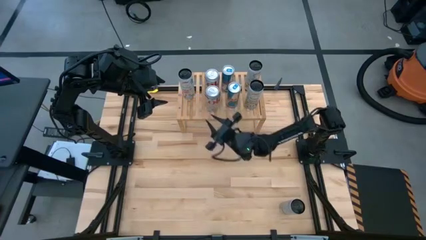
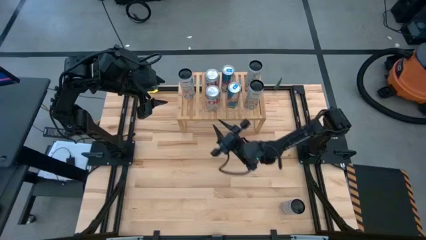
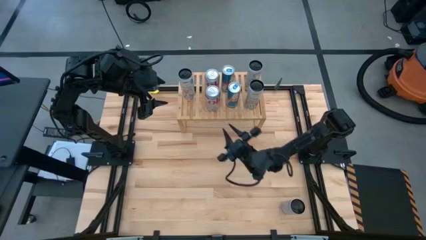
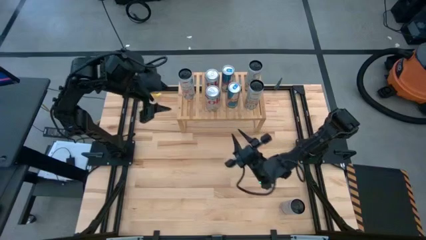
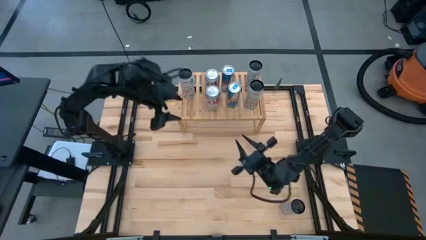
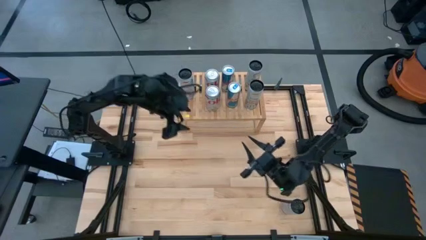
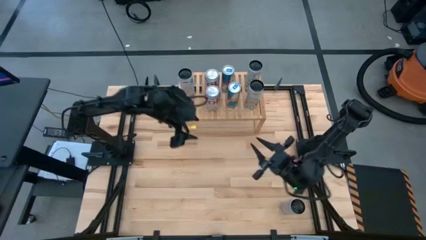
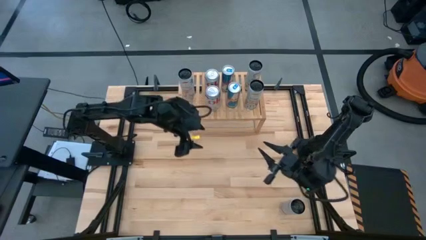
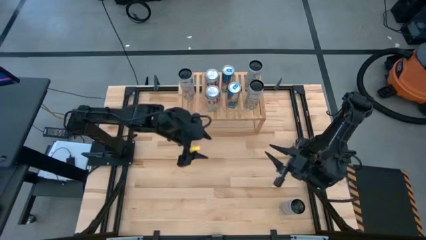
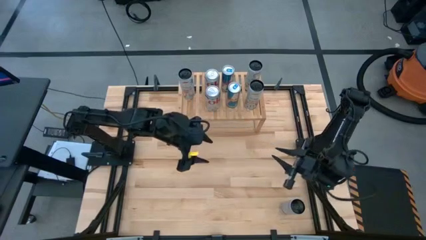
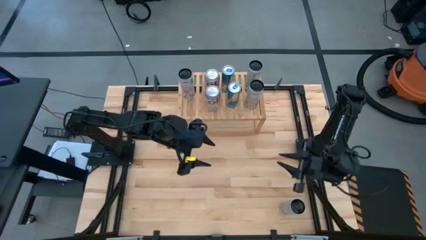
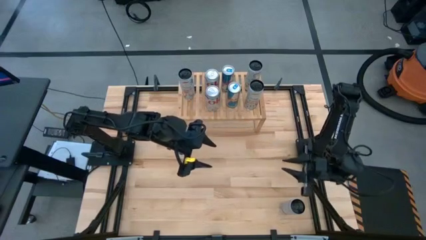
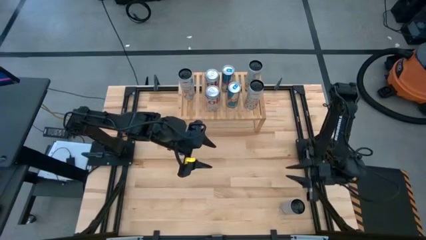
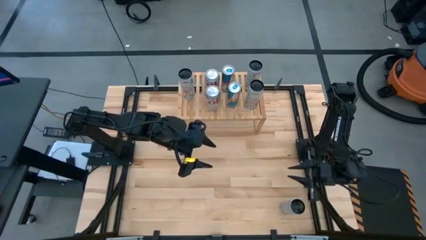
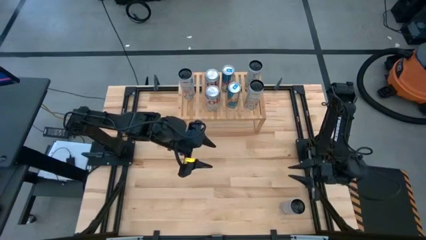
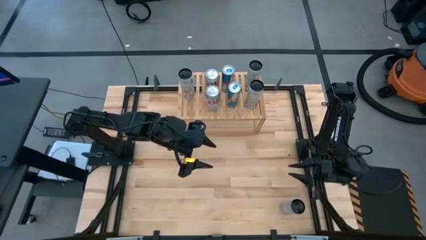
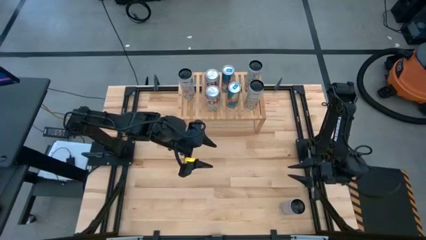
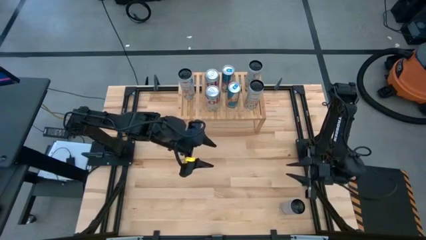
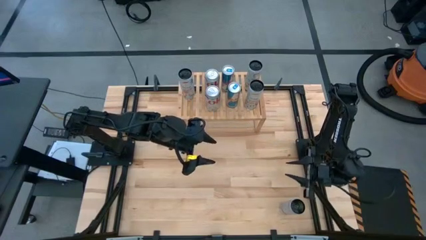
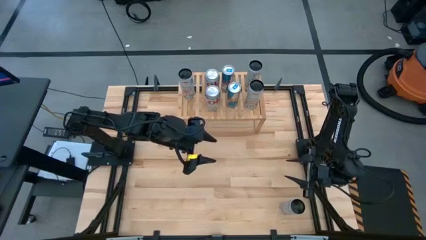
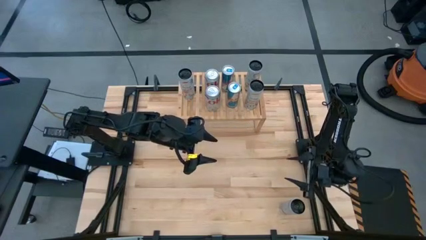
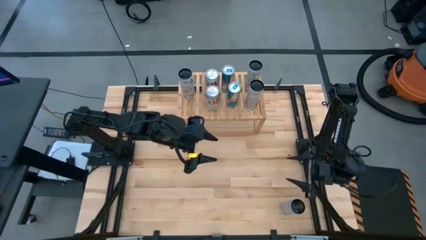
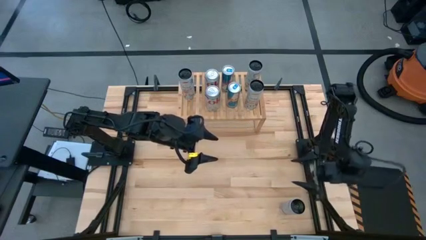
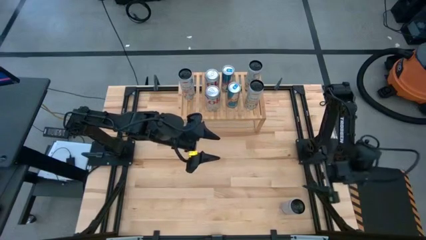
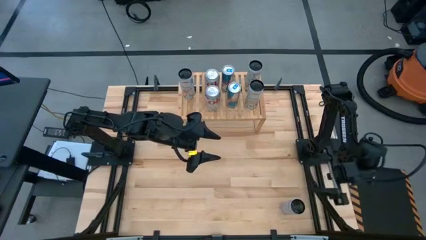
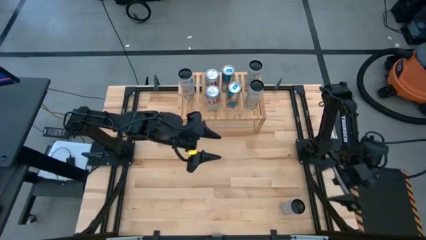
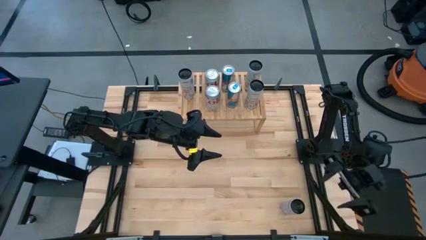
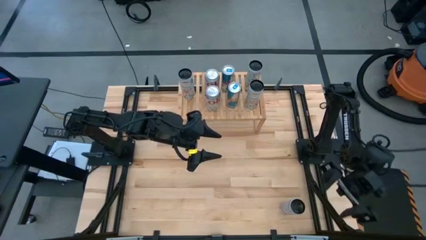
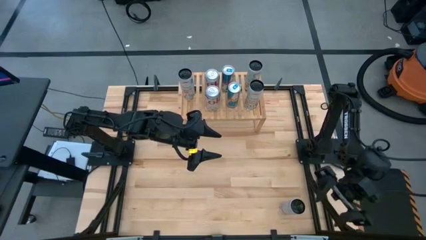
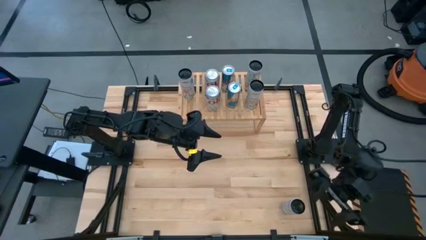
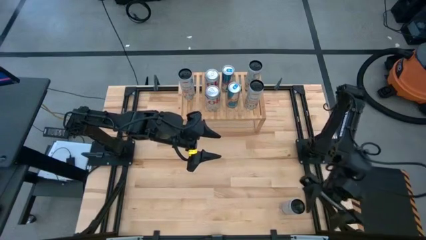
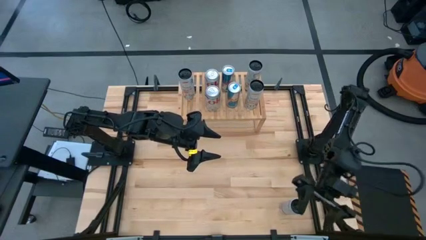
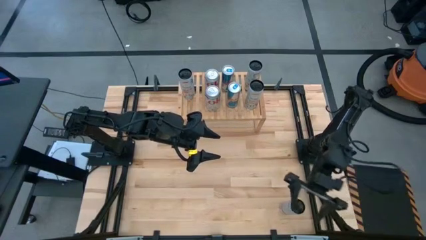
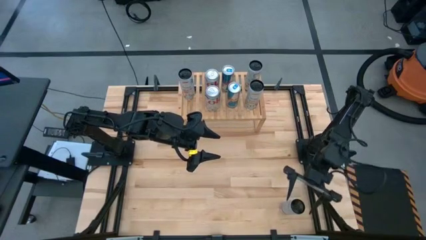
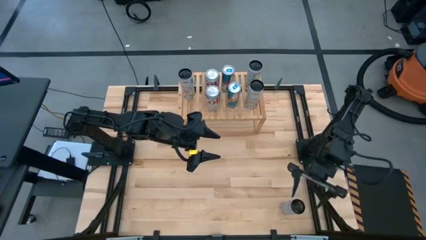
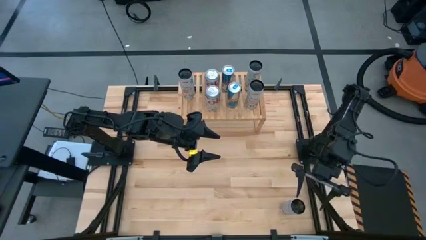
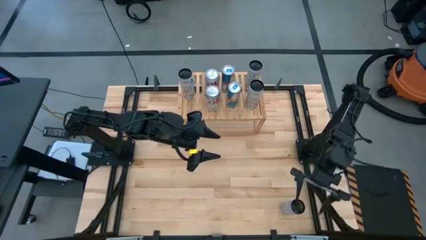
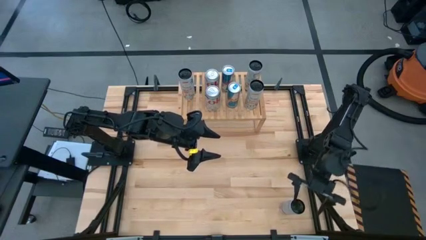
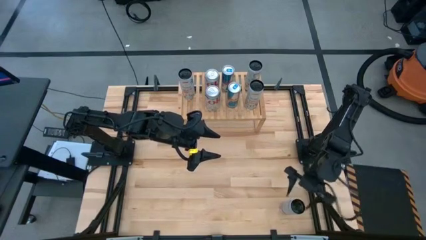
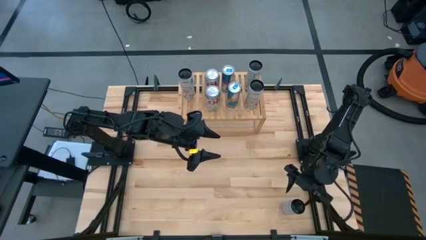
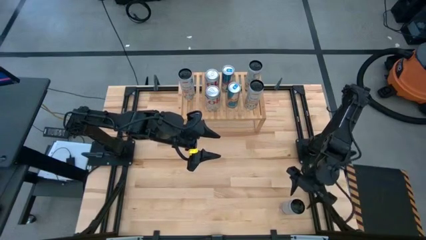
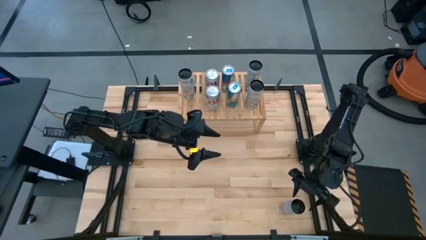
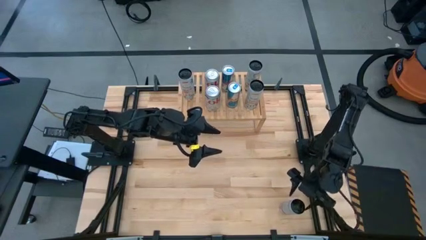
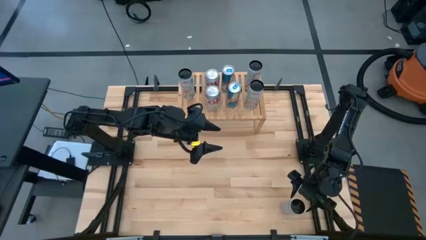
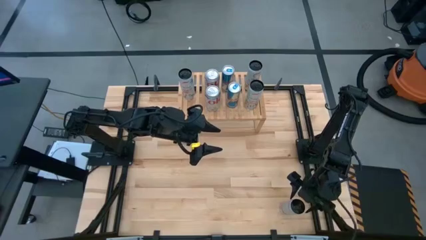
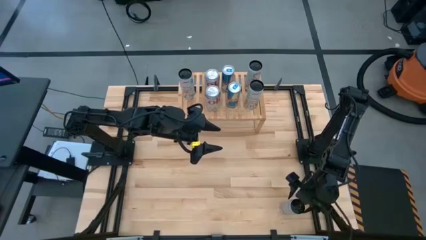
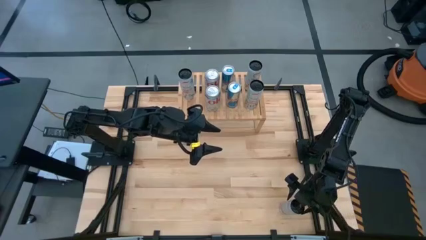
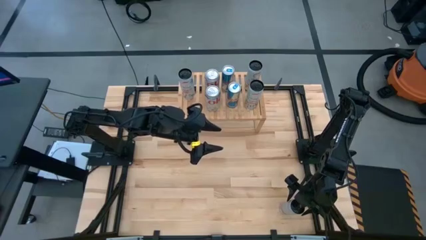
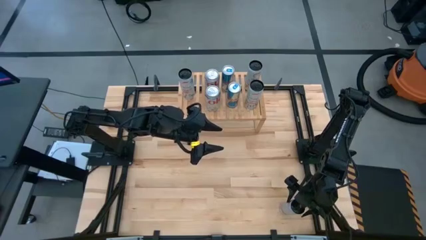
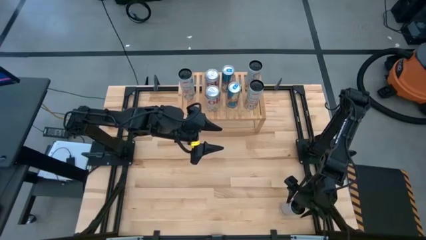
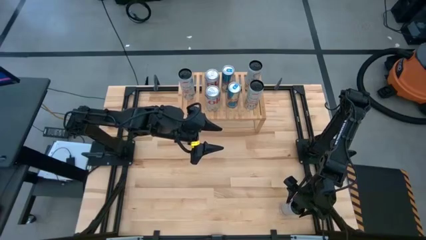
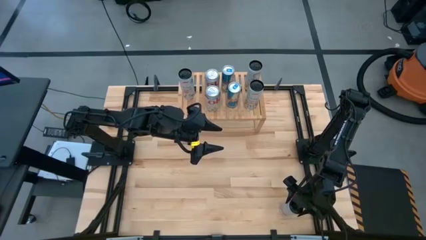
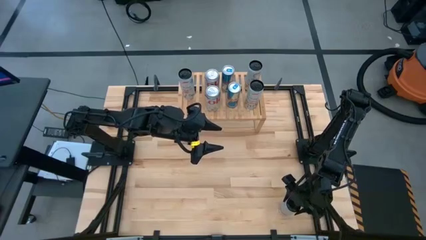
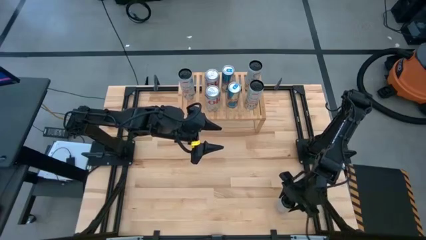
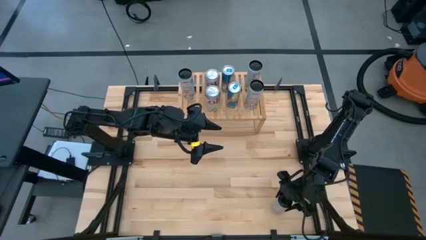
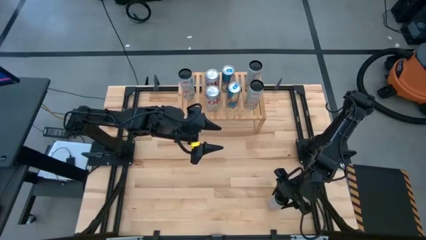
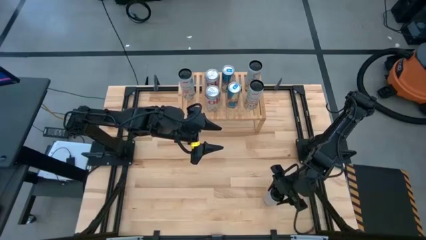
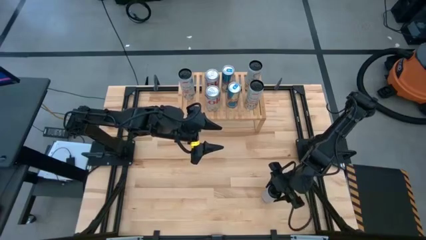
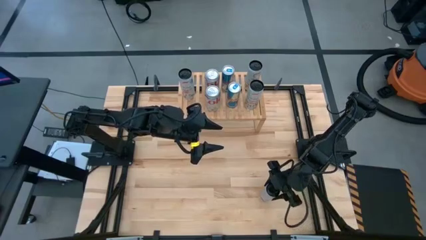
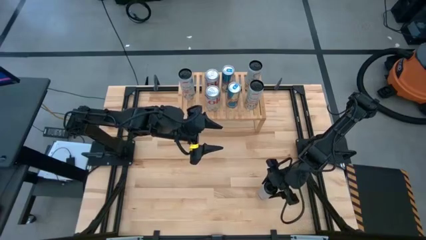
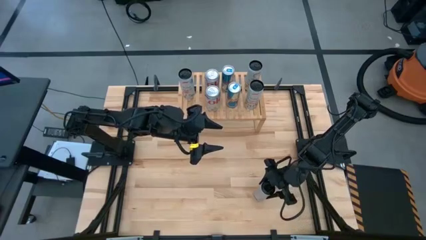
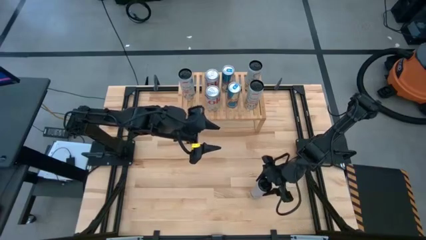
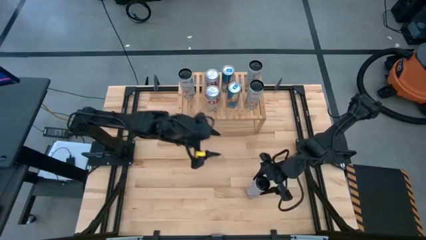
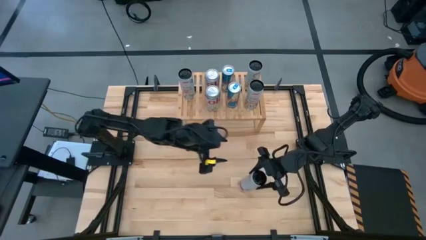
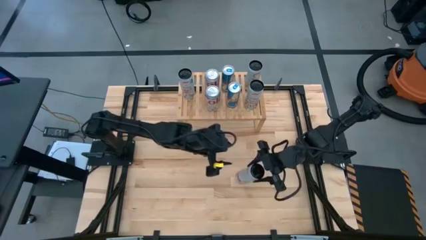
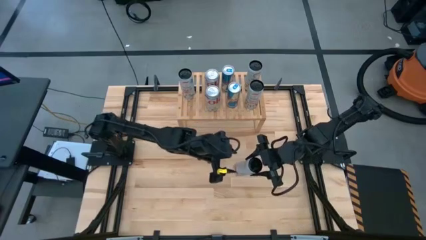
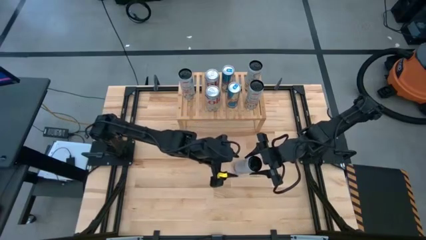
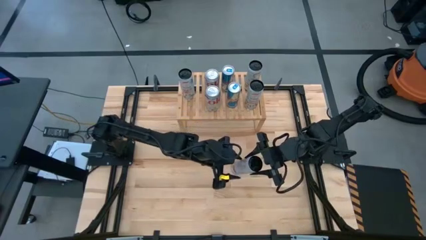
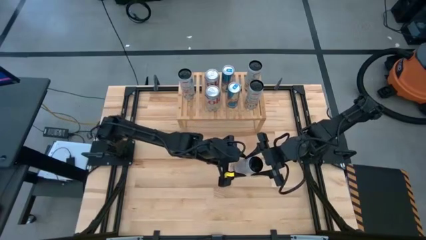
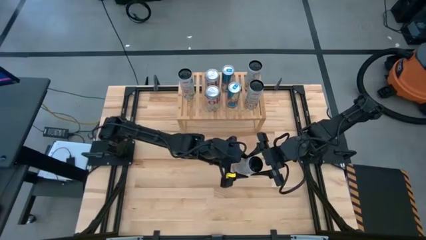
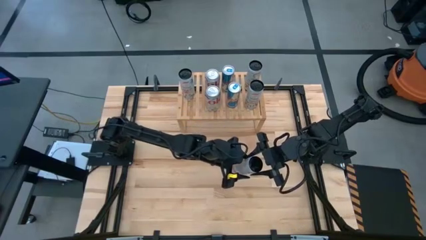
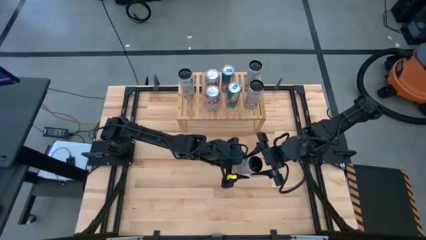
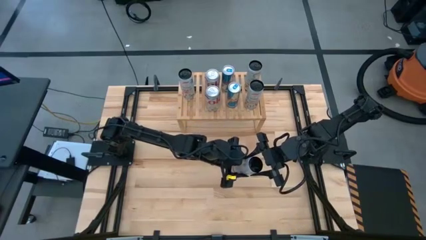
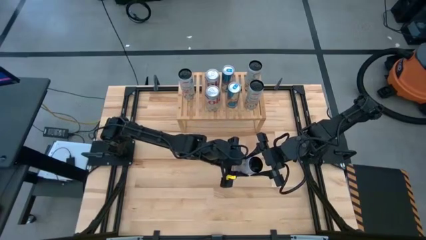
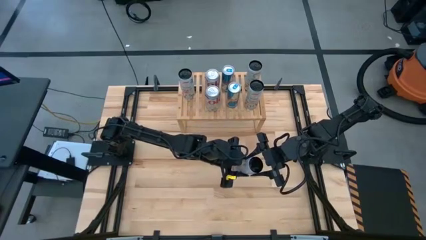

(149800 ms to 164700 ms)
Task: Place canned beverage on shelf
Put the white pink soda can on the shelf aligned with the other white pink soda can
